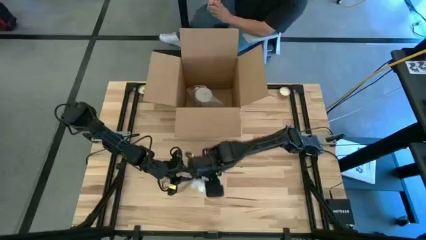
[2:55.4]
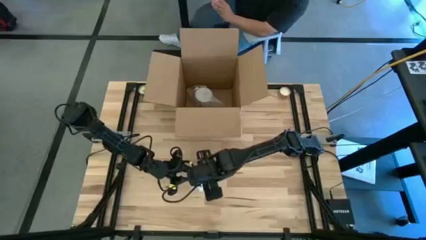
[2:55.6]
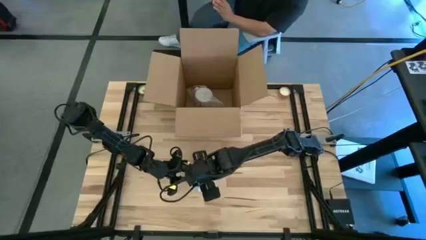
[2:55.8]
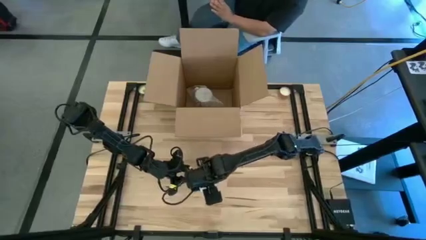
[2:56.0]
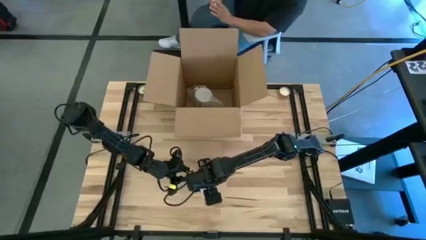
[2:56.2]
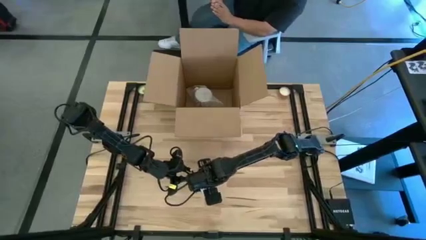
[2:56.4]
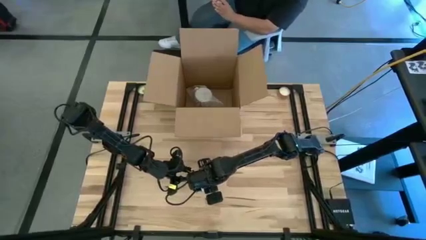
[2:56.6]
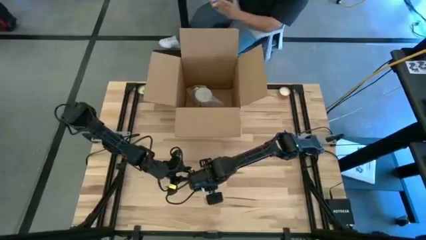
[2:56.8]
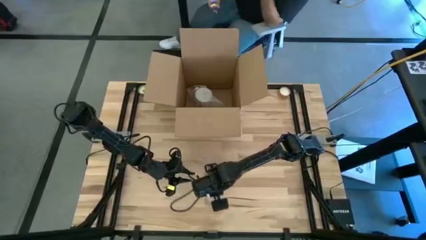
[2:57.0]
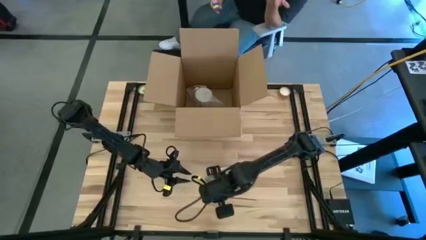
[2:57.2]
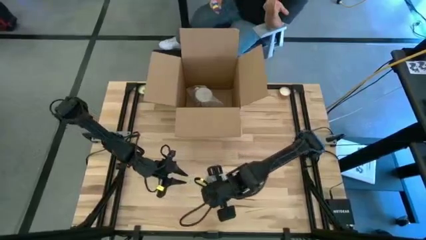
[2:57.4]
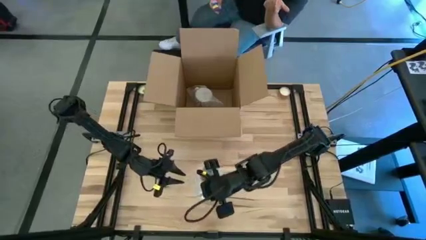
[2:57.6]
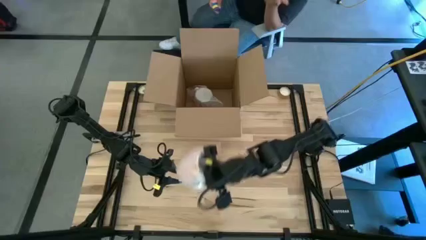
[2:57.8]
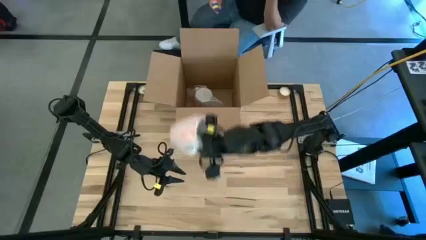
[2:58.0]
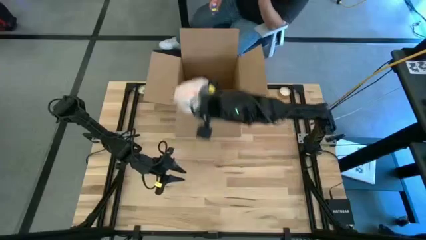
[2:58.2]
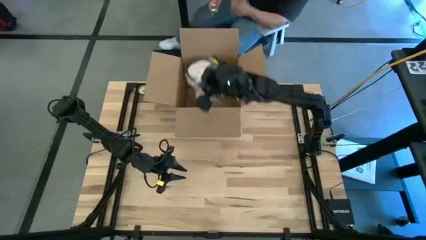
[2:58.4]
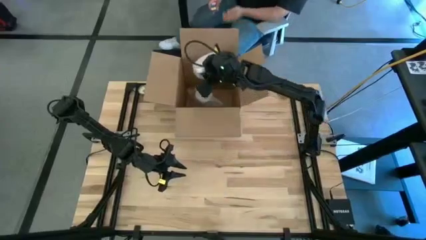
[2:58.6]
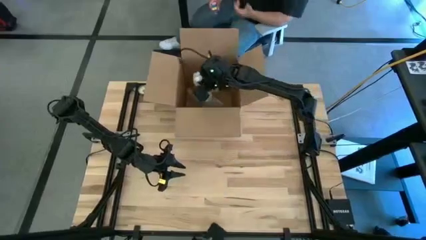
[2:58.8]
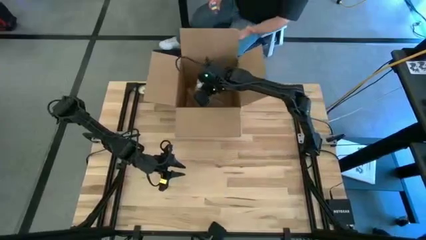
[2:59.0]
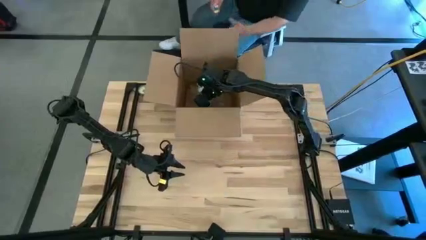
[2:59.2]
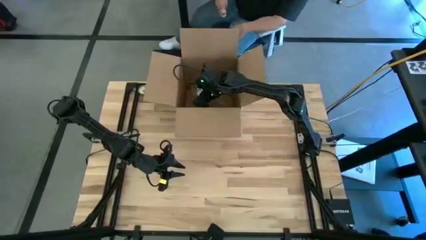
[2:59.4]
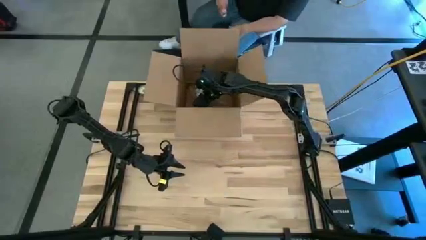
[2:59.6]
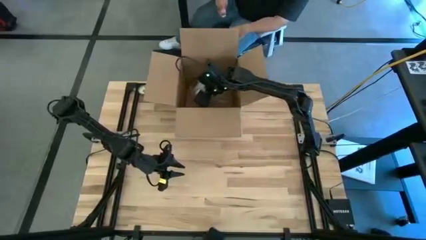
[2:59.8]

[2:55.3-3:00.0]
Task: wrap mug
Put the yellow mug into the cardboard box

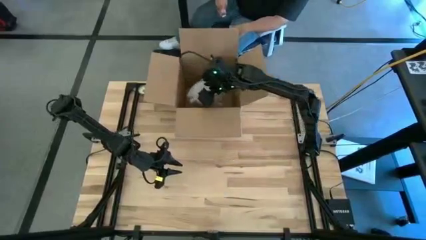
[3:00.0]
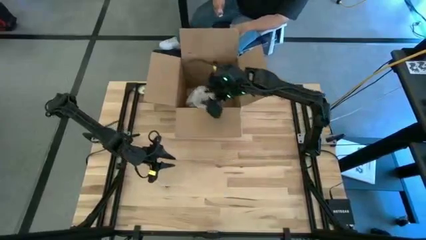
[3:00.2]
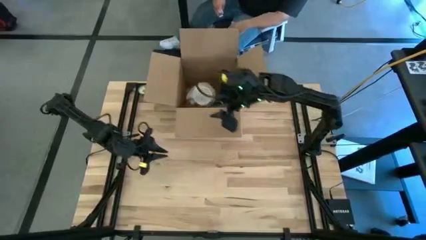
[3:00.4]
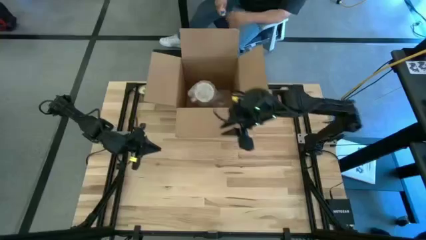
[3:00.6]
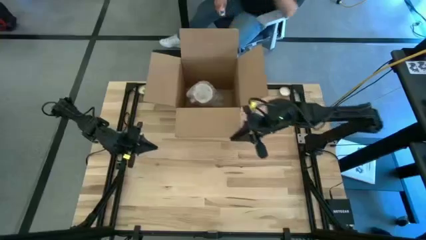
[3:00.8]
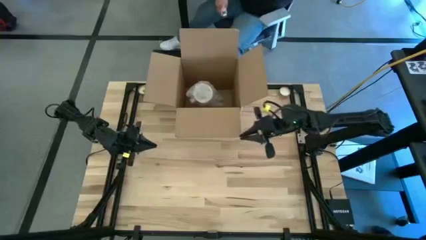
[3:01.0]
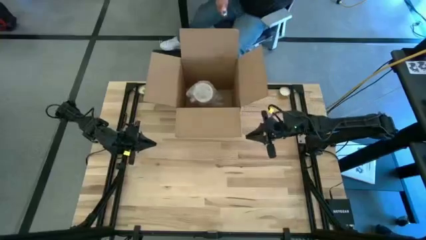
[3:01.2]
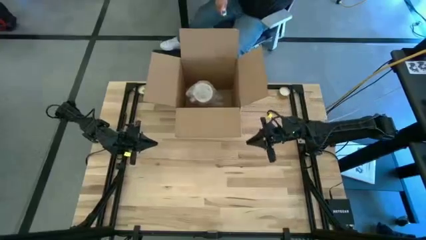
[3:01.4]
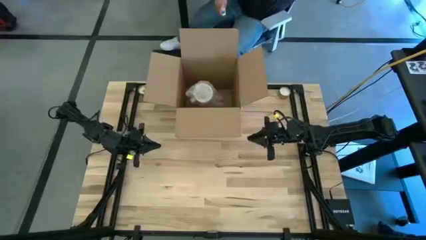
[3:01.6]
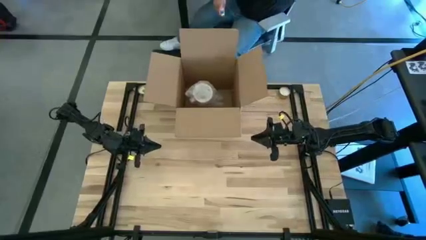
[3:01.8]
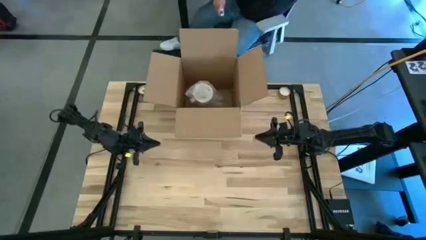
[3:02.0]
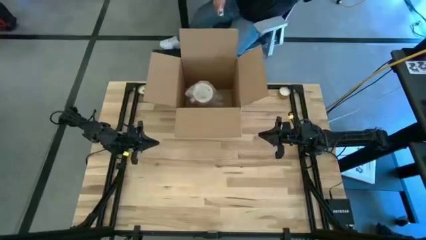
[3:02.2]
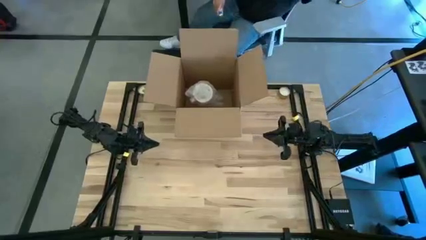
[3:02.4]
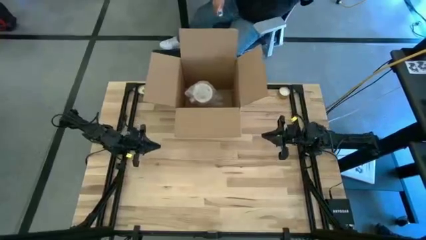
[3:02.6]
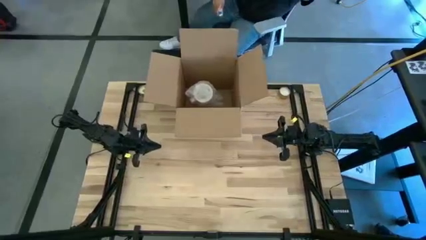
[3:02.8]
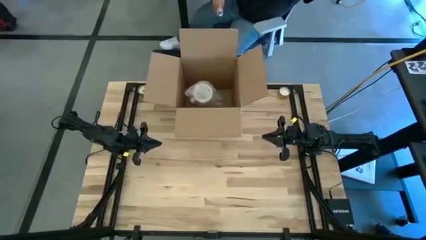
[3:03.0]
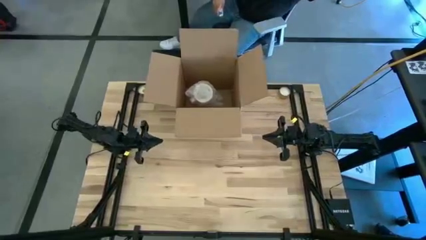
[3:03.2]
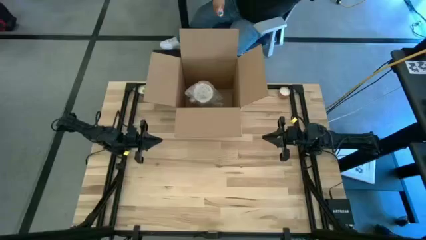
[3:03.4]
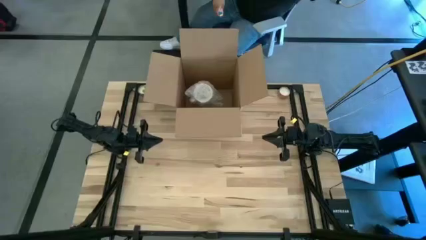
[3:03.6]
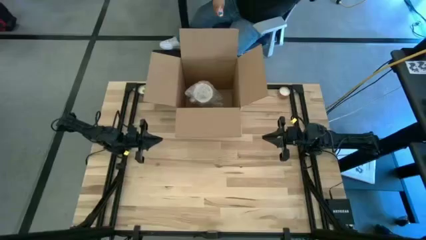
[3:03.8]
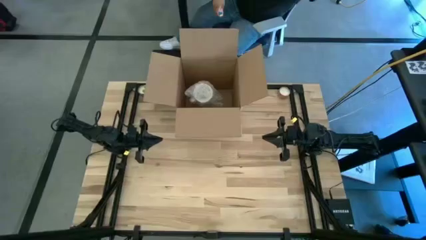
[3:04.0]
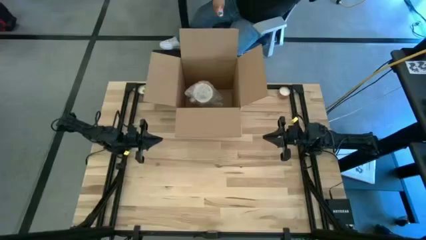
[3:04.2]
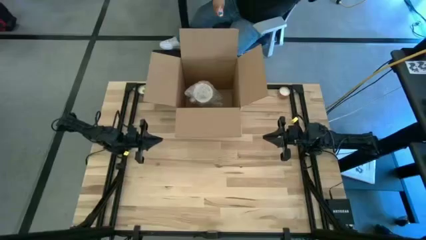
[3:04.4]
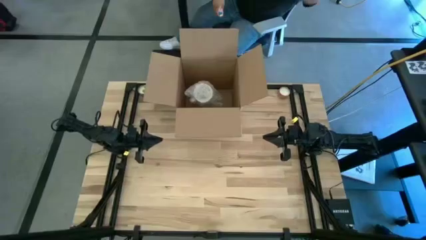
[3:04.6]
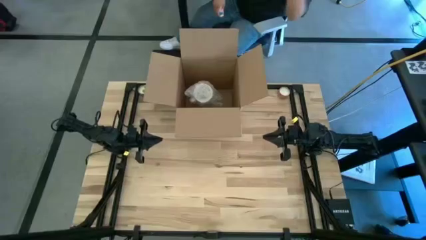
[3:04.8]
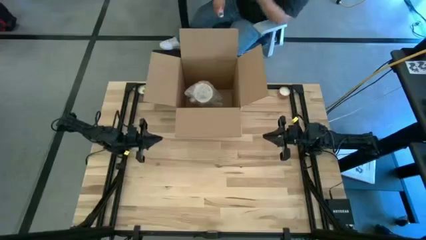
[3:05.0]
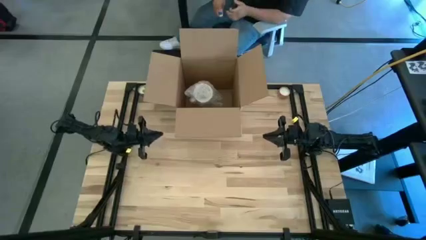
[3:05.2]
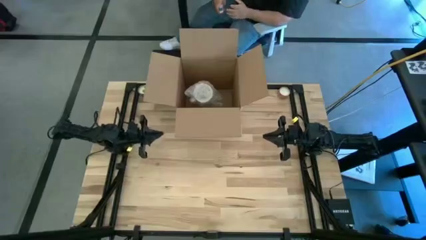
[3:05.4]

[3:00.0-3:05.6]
Return to Home Position

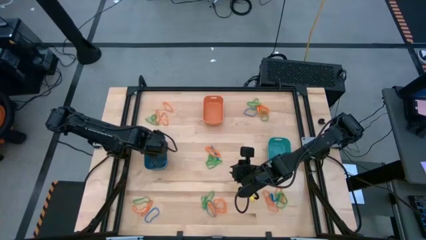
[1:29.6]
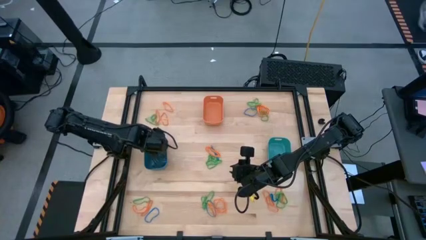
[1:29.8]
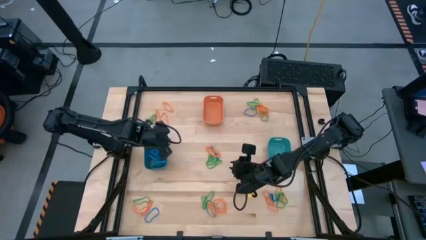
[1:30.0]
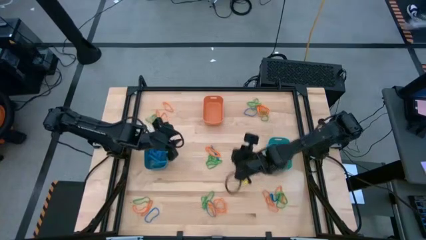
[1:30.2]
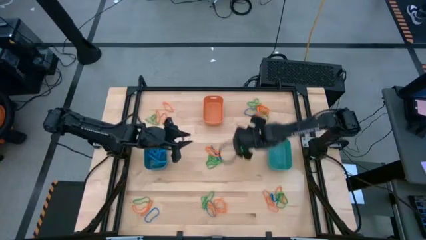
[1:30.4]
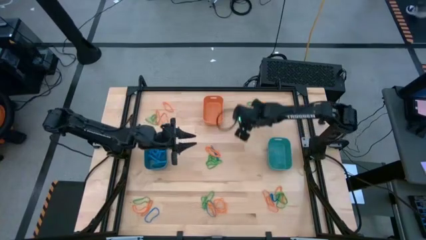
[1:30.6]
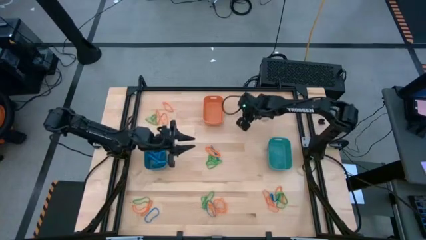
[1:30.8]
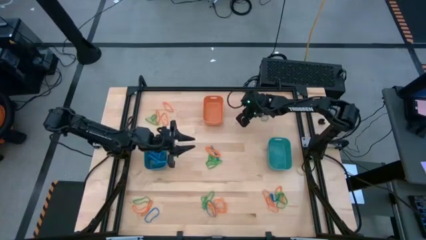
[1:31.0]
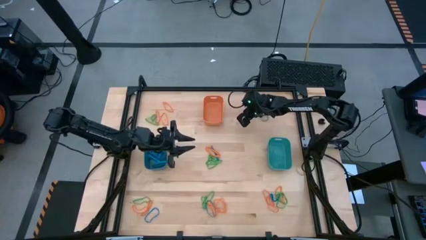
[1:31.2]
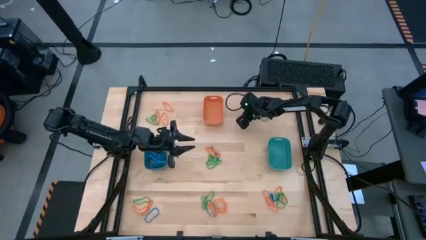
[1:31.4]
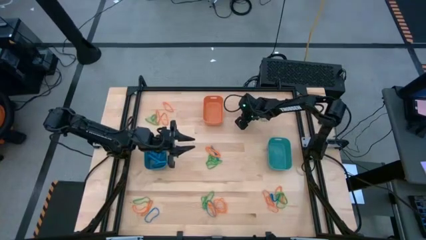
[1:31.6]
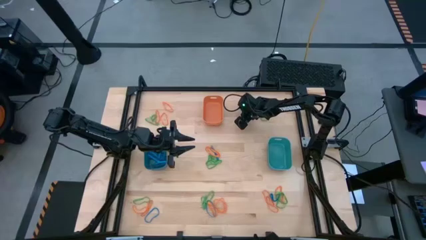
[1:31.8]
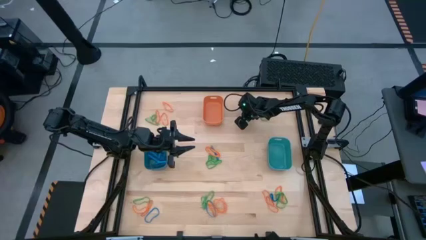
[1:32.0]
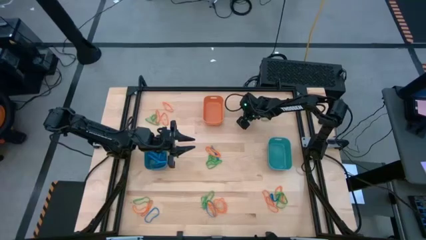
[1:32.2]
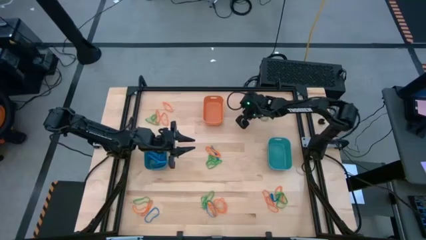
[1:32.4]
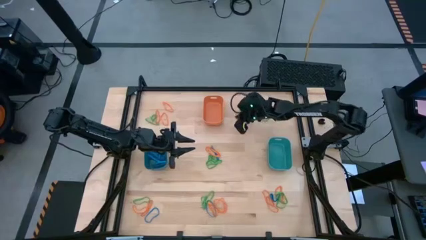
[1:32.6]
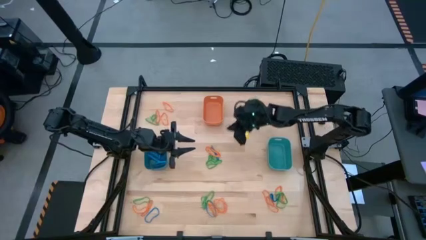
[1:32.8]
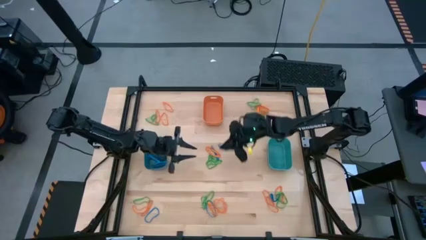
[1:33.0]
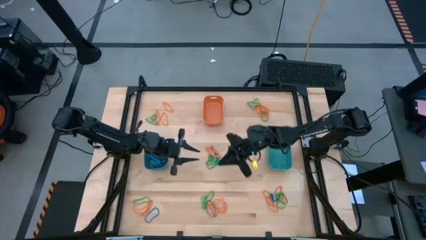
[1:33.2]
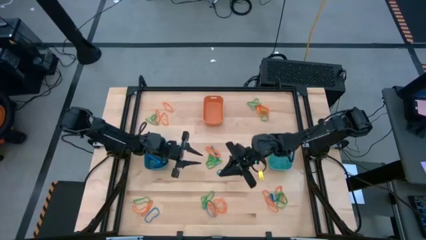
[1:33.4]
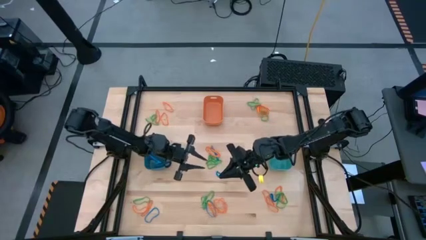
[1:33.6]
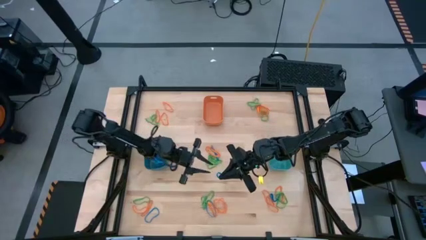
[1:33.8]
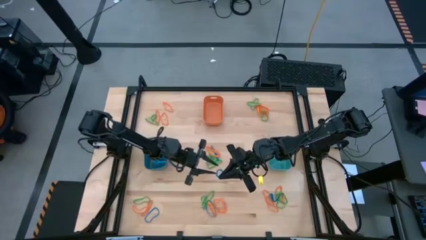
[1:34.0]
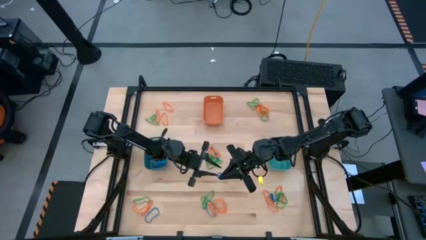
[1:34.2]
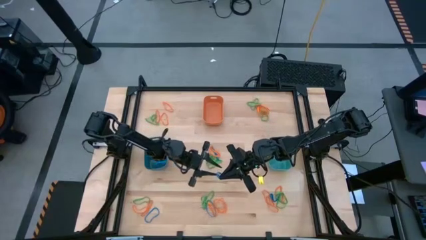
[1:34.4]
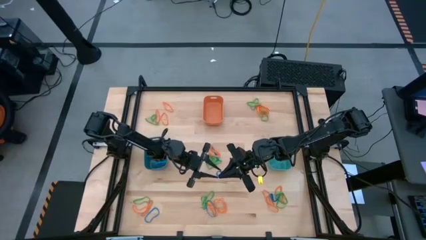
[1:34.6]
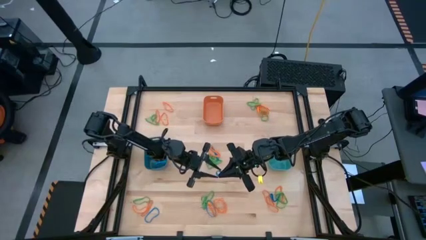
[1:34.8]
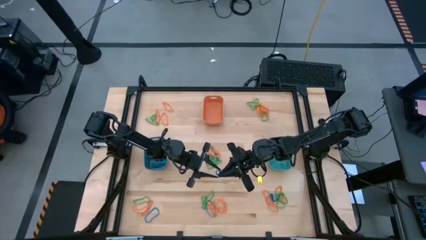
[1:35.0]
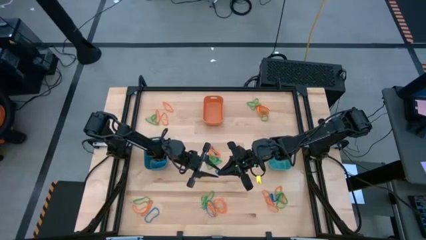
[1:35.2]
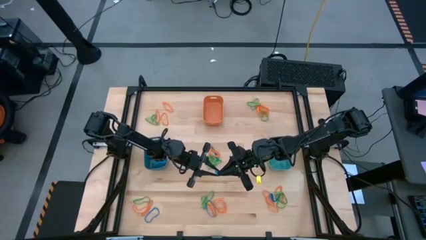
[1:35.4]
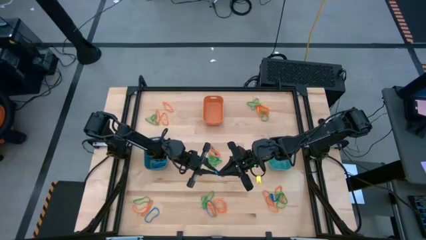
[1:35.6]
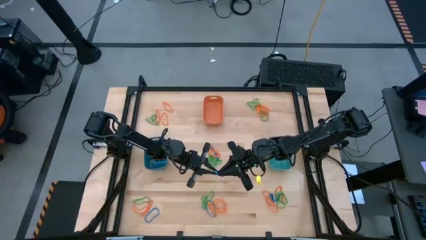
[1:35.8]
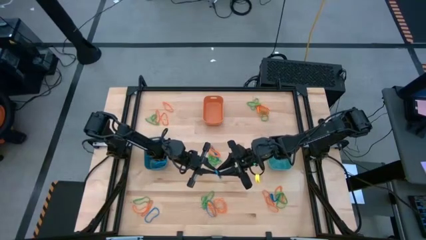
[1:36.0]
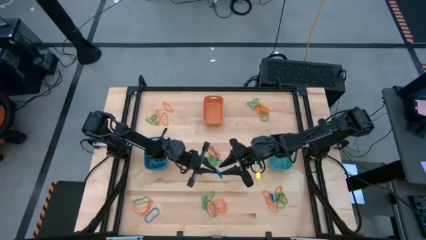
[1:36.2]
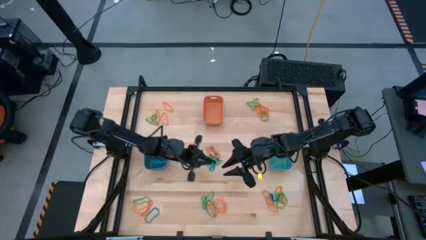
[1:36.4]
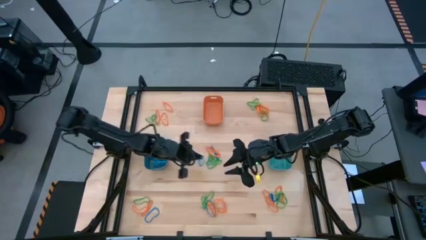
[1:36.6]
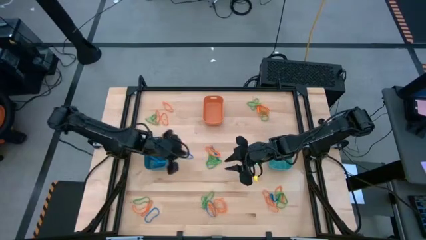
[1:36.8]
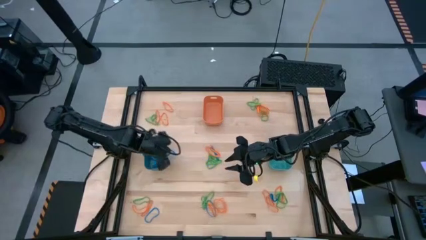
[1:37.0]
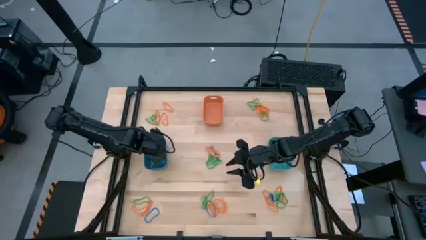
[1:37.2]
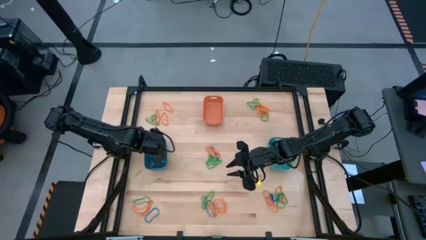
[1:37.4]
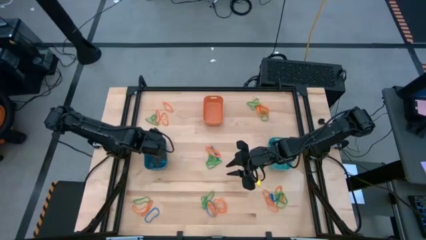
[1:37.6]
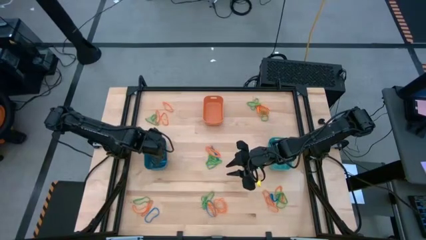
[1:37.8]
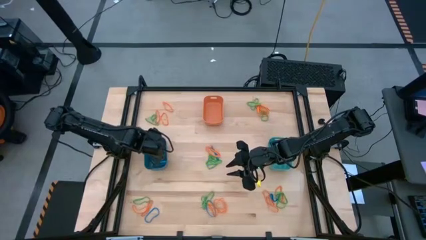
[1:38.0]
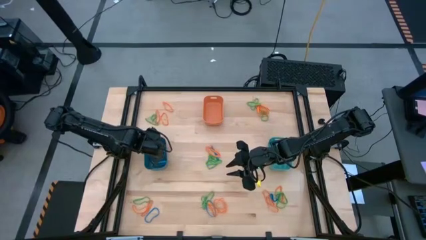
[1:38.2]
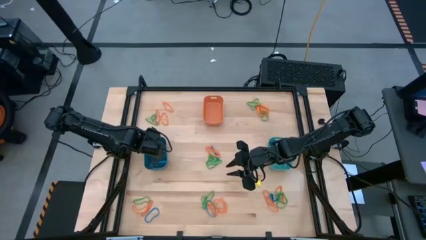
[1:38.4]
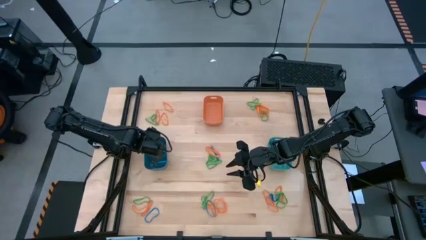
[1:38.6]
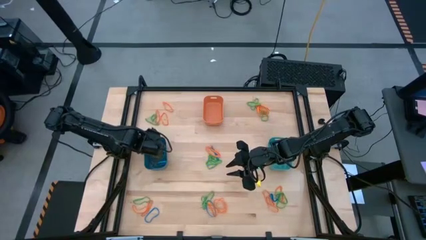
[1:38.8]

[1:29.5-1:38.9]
Task: Sort rubber bands into baskets
Put the blue rubber band into the blue bin
